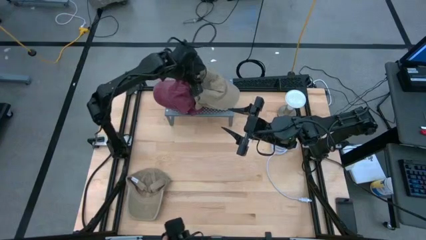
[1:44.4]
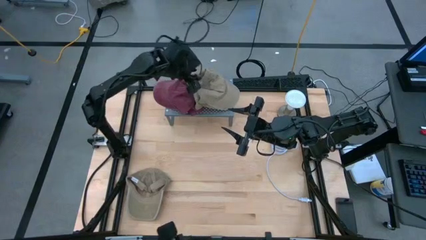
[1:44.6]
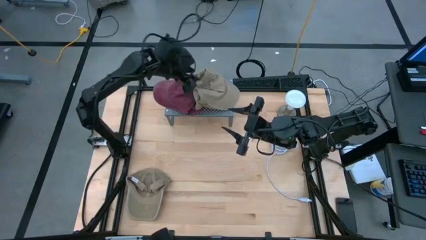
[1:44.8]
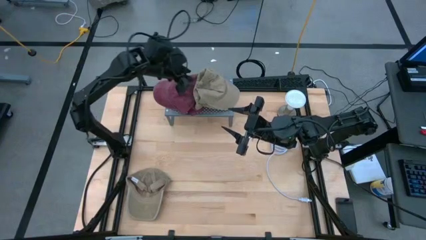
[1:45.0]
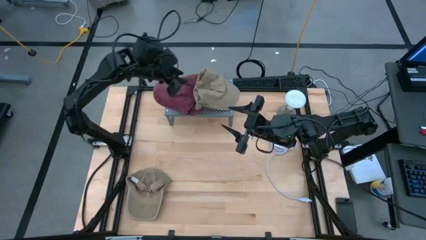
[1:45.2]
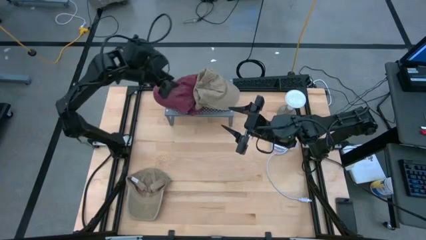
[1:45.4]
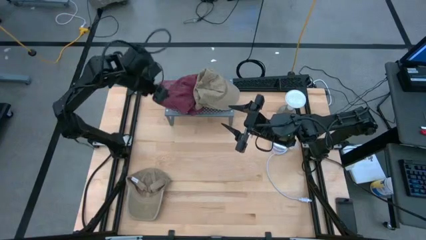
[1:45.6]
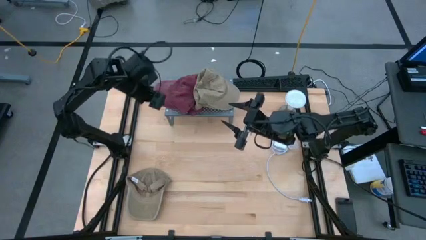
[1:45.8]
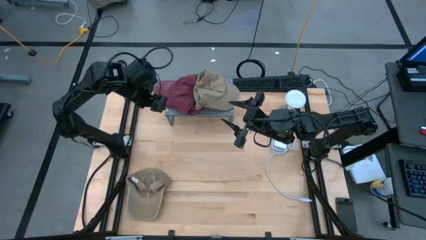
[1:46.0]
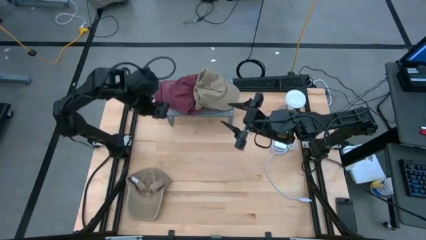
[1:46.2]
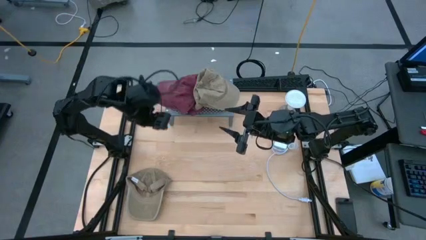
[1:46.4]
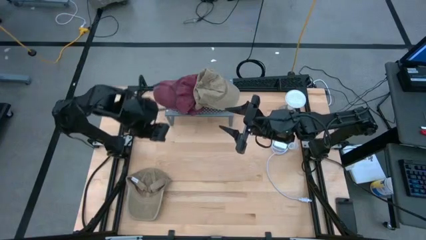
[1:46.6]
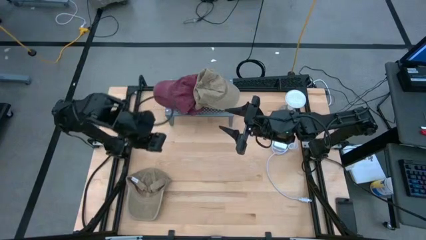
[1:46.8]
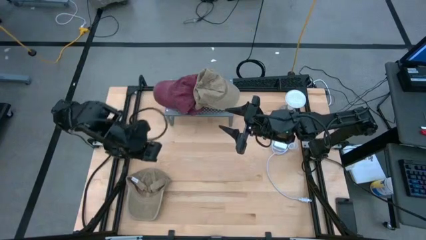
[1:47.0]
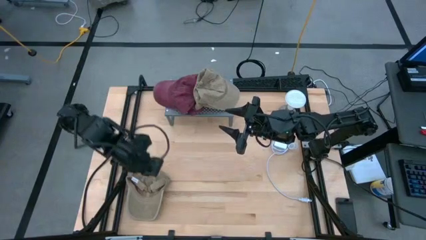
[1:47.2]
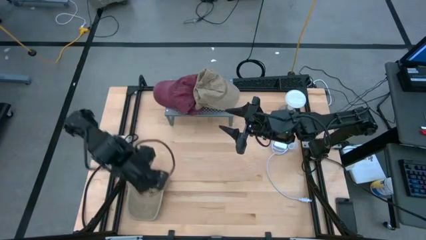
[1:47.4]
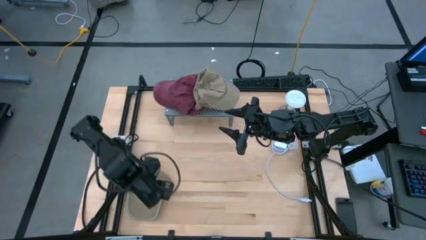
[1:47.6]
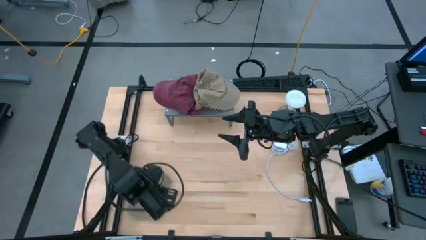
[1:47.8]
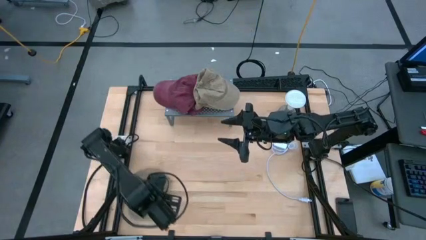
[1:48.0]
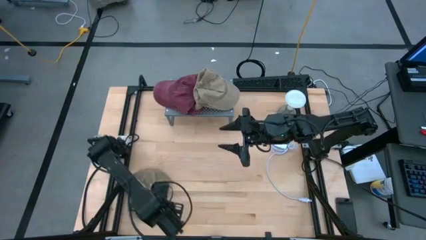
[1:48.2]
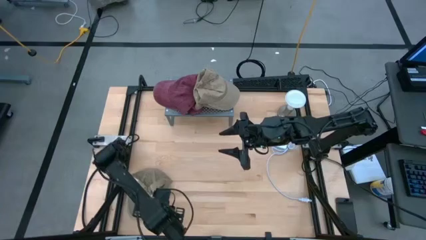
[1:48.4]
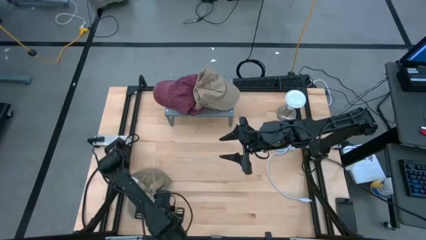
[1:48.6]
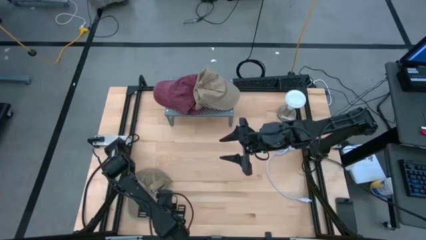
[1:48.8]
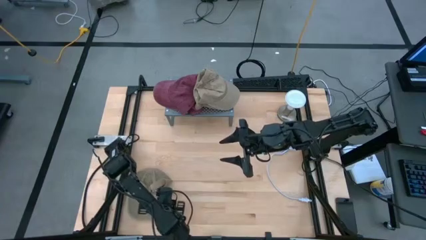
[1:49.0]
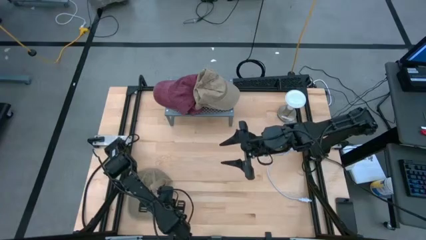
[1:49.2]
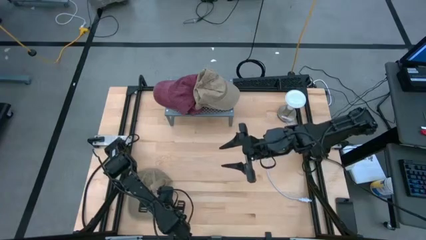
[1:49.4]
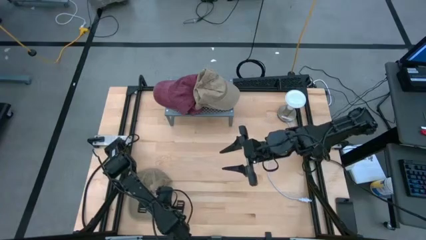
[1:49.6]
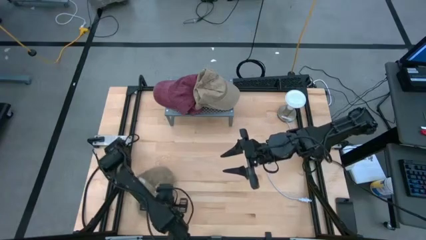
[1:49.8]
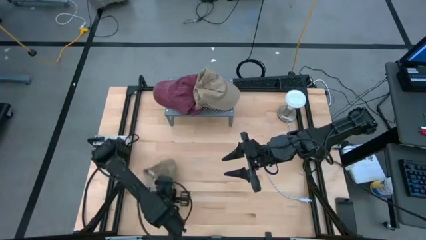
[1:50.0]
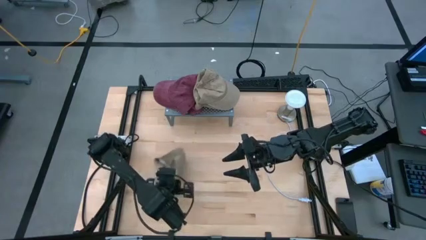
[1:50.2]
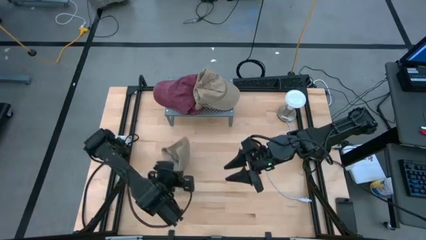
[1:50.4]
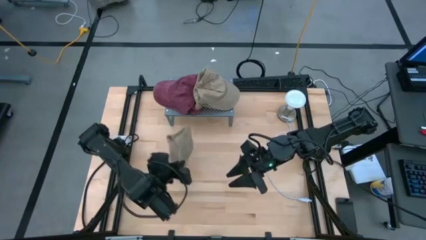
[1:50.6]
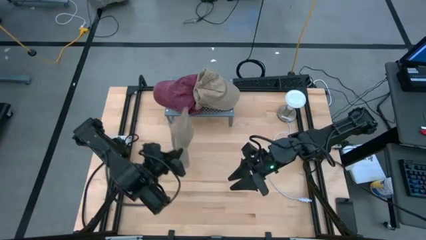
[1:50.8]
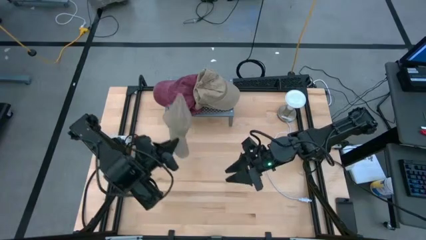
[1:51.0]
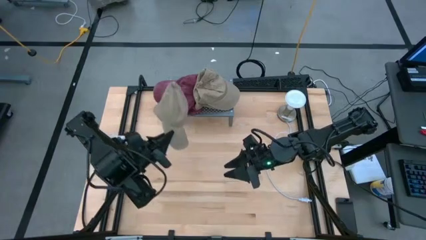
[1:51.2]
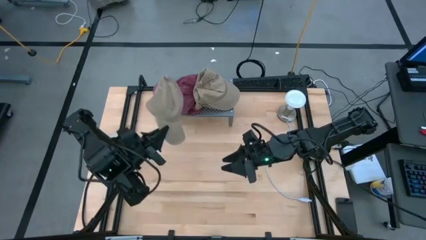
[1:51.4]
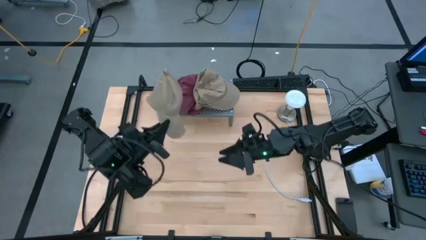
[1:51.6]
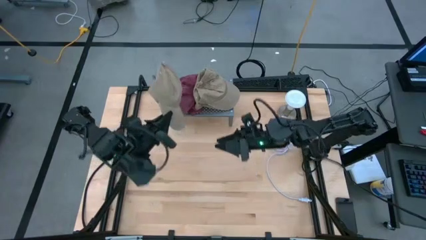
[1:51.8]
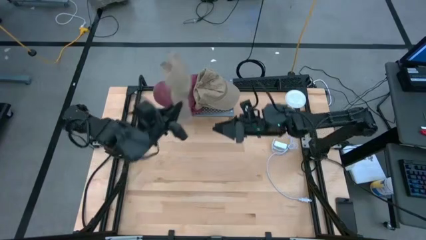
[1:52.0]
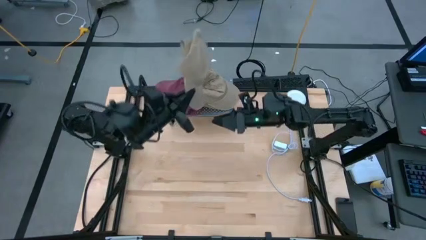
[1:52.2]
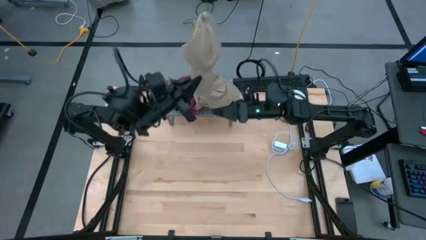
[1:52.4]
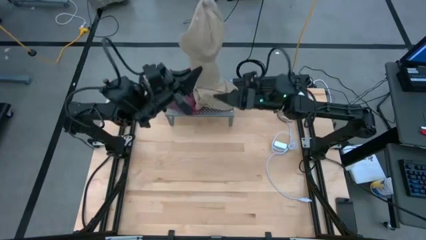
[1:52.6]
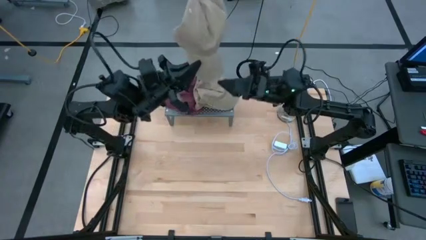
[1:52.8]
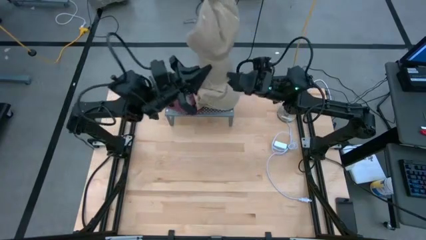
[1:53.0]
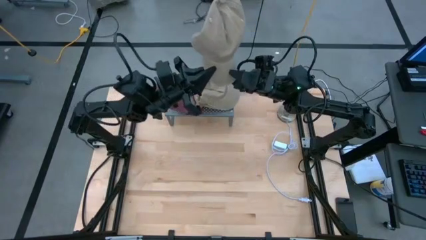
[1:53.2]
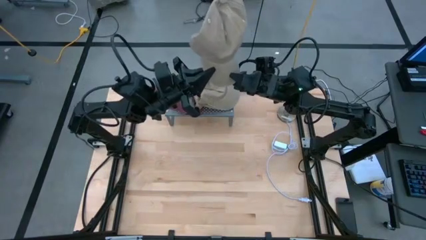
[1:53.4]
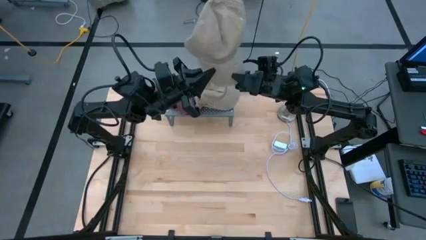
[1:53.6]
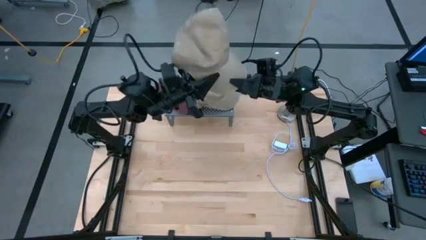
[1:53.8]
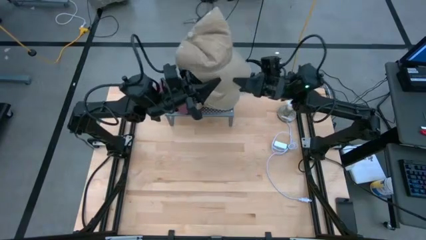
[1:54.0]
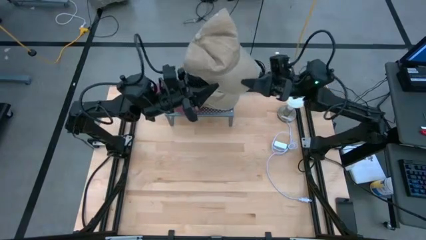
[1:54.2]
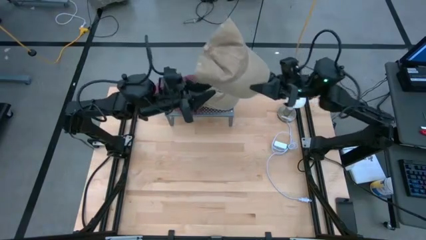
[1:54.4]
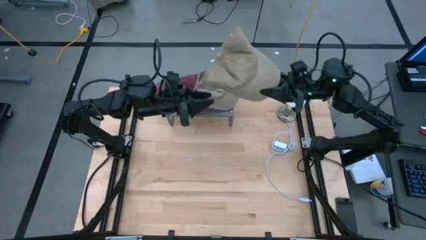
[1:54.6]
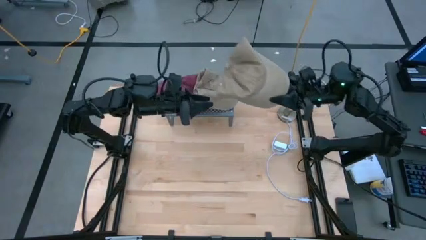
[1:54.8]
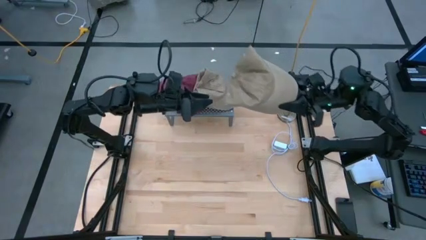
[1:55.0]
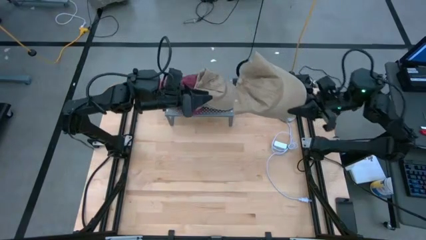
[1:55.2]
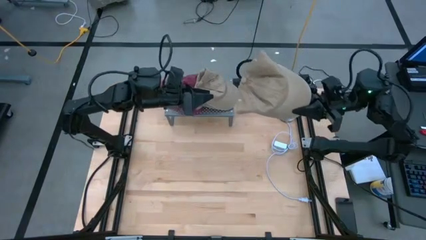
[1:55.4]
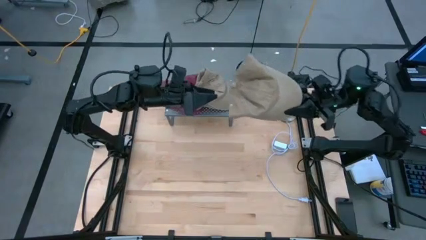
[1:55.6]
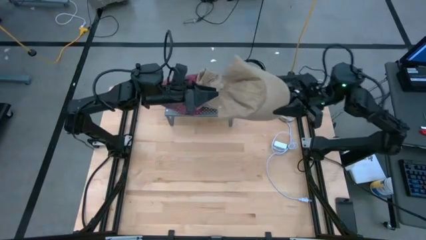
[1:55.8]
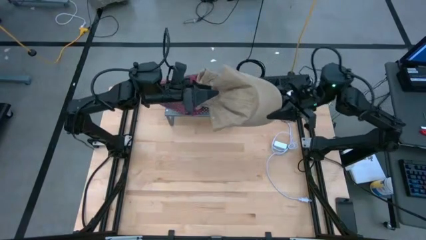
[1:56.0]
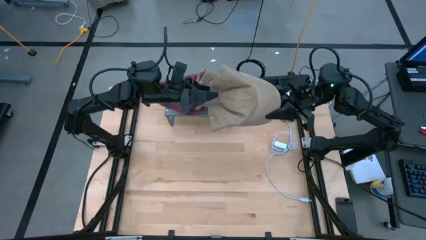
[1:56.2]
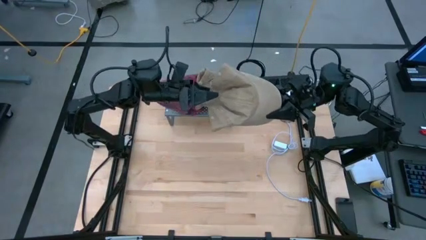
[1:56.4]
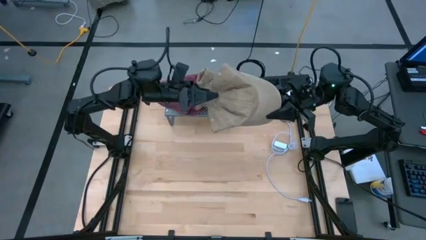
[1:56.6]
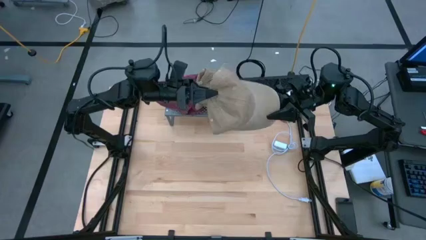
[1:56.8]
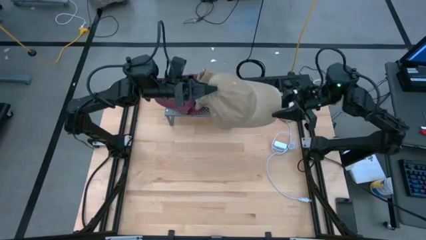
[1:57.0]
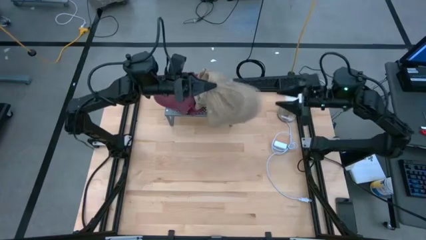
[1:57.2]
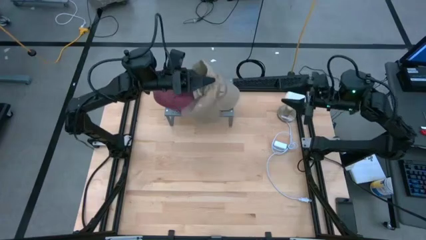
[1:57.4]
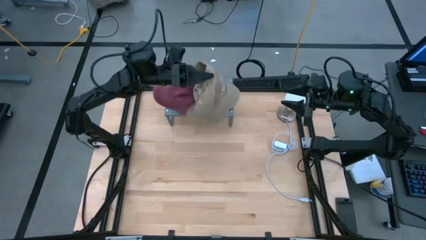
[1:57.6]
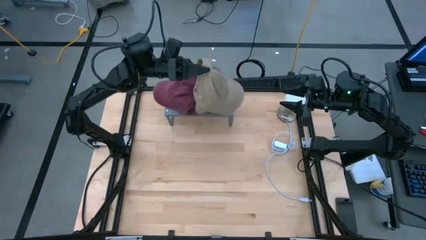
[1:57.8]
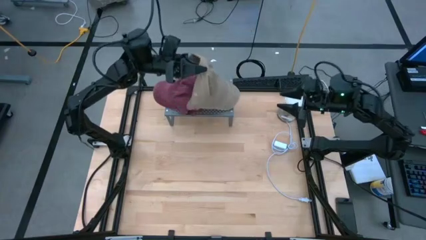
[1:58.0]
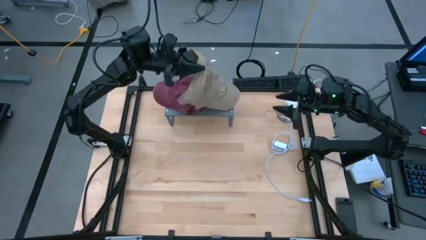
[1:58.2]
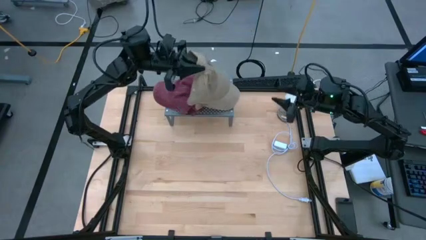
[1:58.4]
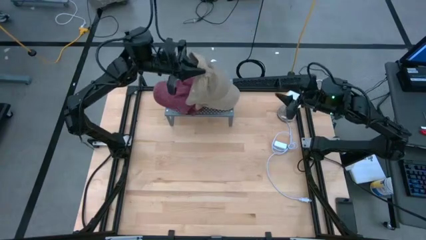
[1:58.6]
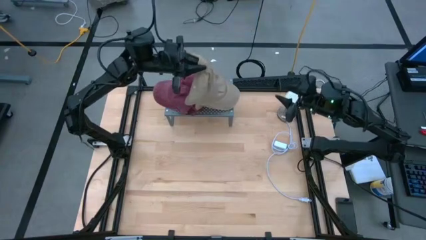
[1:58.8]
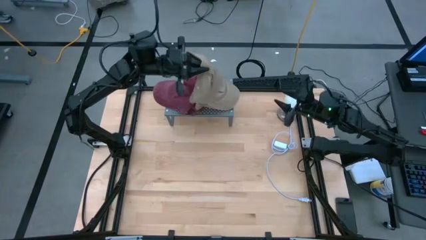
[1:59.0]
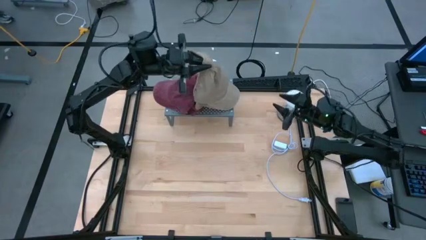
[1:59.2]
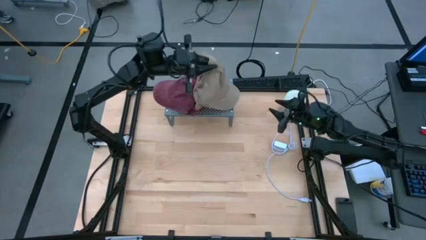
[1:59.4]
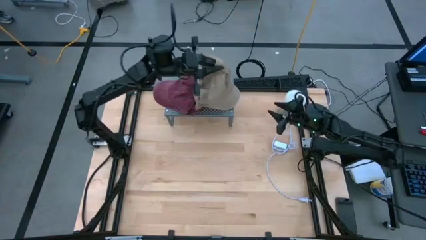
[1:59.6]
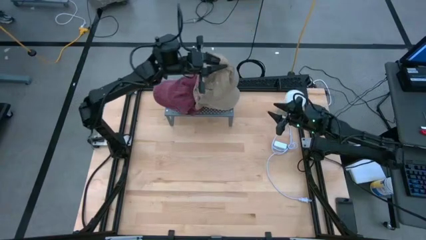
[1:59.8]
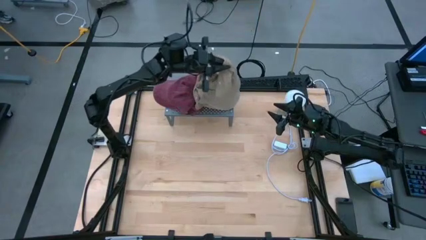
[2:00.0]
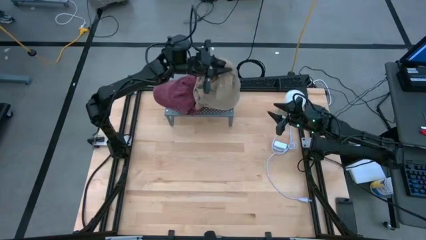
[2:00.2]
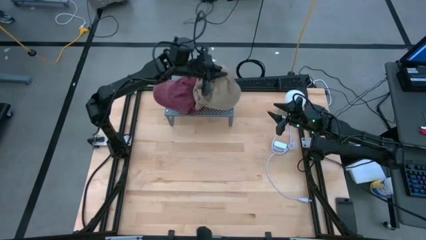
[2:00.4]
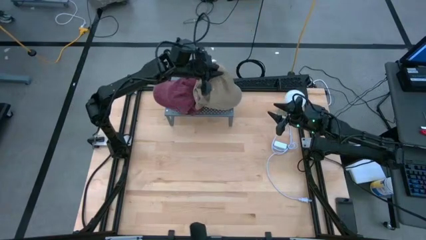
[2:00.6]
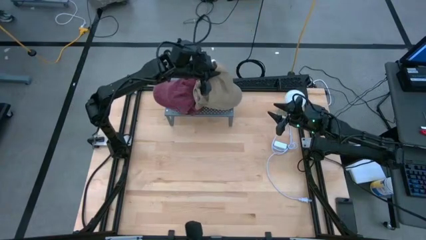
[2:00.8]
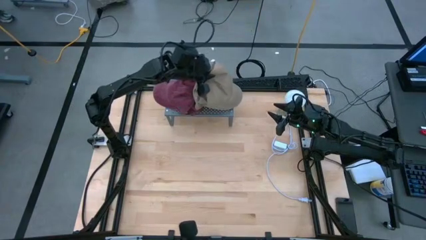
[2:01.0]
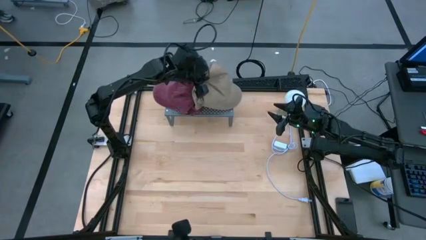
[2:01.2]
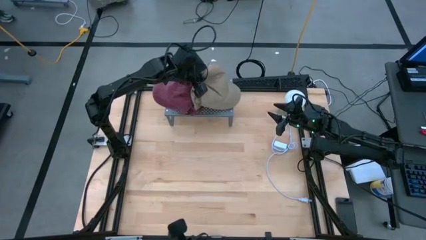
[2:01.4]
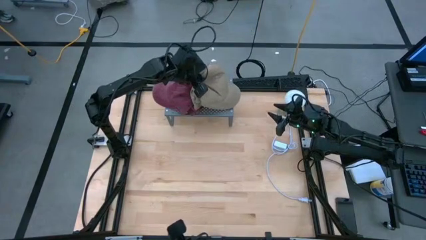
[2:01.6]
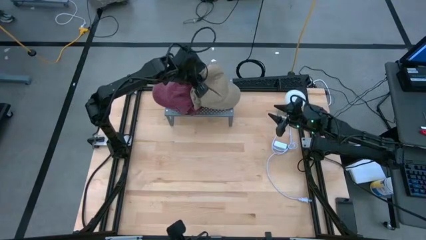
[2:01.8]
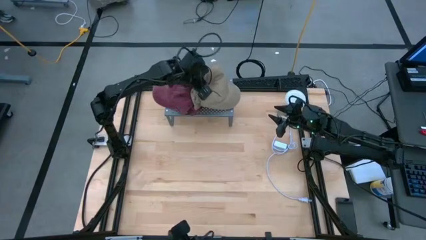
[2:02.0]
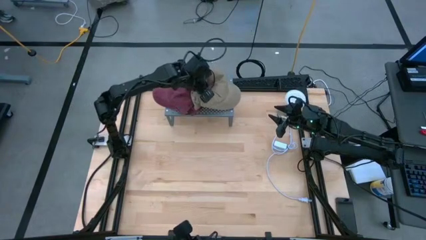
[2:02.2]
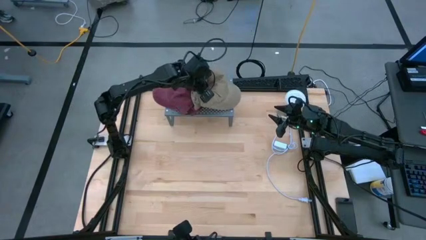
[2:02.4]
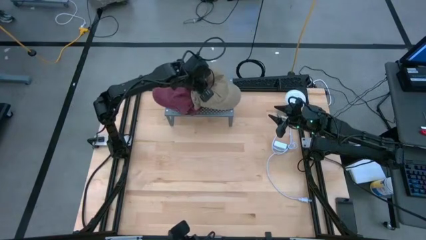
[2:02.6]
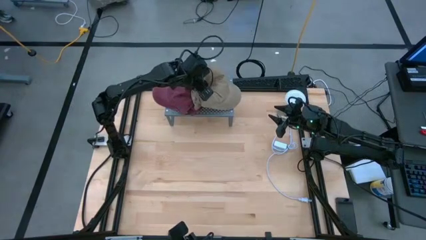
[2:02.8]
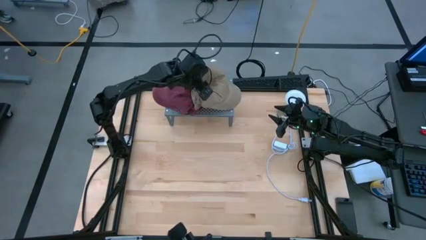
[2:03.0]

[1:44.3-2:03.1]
Task: Pick & Place hat
Stack the light brown cap on the light brown caps on the shelf
